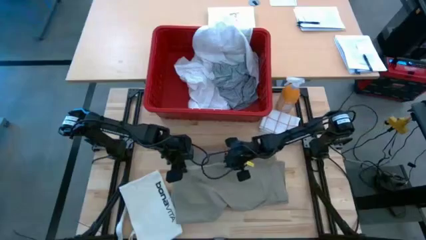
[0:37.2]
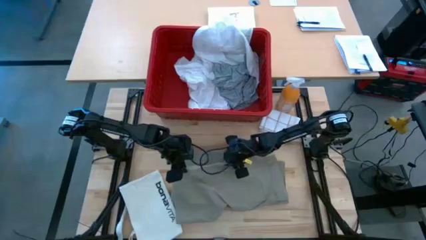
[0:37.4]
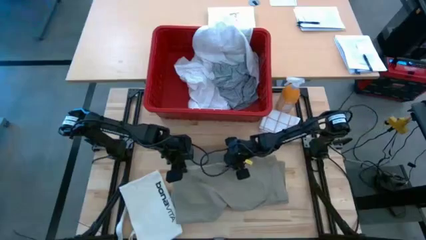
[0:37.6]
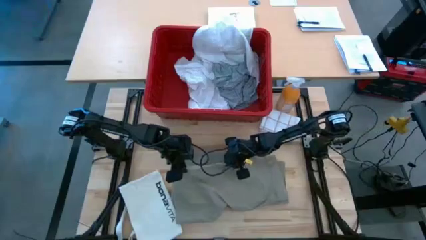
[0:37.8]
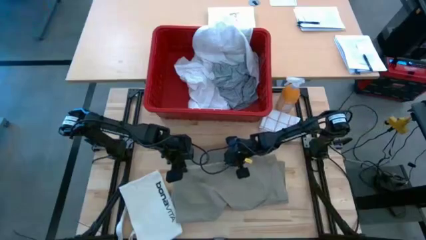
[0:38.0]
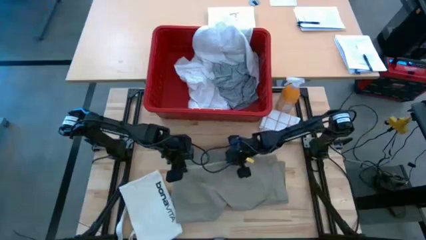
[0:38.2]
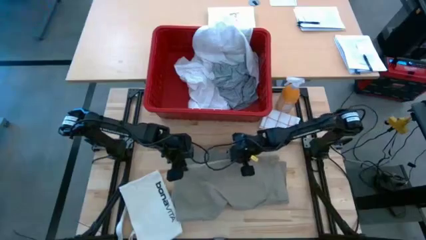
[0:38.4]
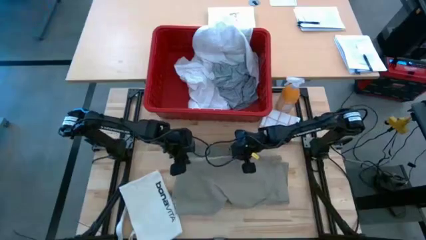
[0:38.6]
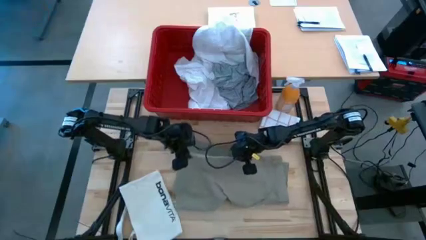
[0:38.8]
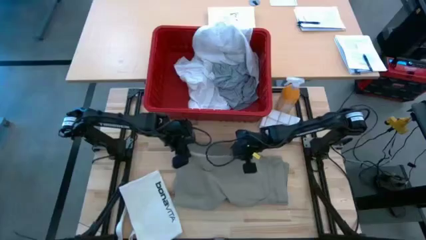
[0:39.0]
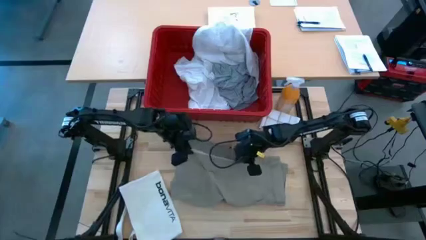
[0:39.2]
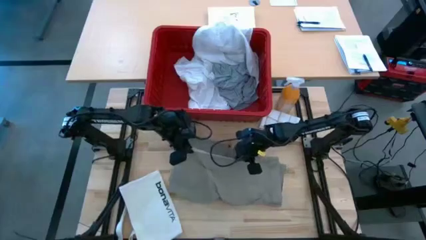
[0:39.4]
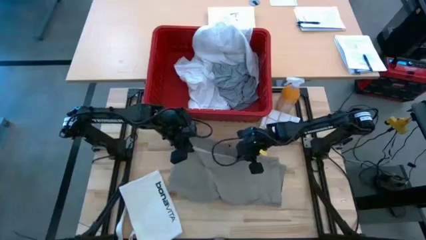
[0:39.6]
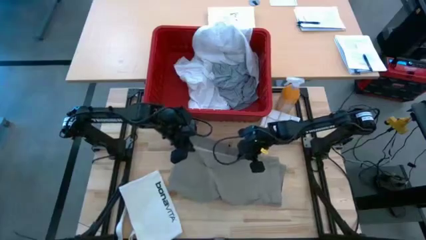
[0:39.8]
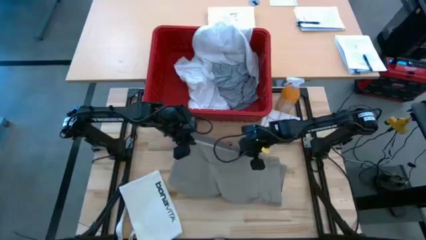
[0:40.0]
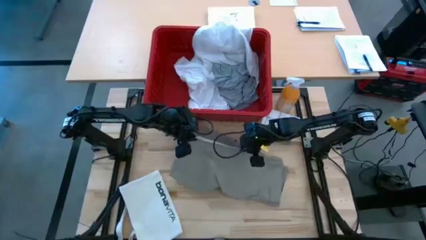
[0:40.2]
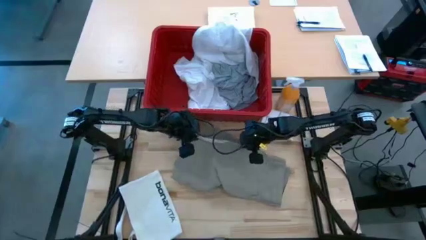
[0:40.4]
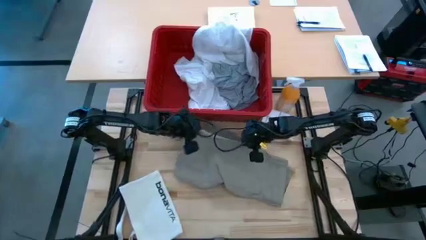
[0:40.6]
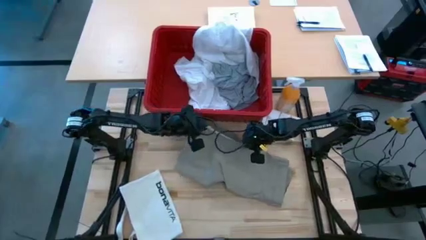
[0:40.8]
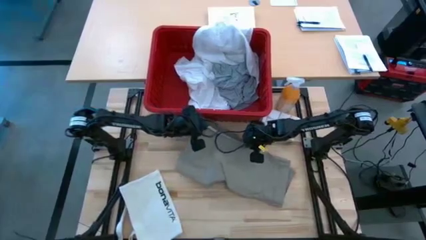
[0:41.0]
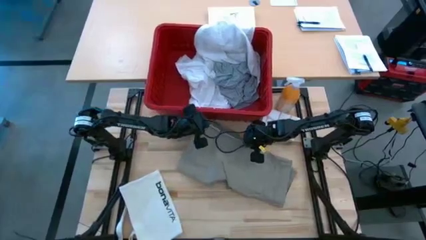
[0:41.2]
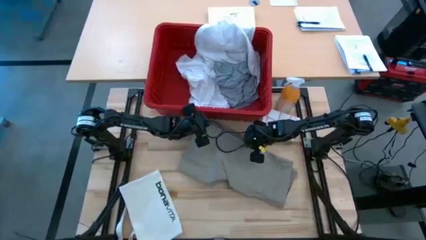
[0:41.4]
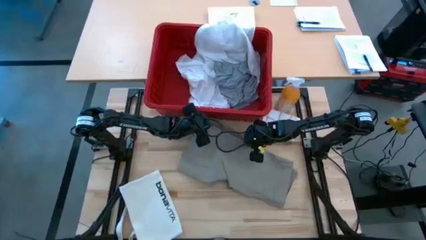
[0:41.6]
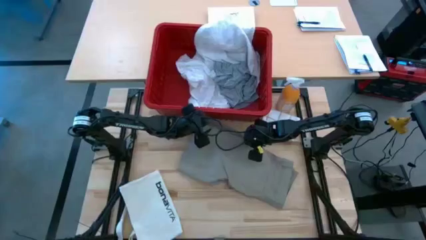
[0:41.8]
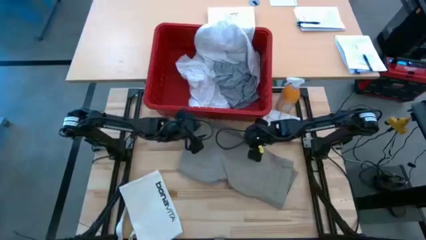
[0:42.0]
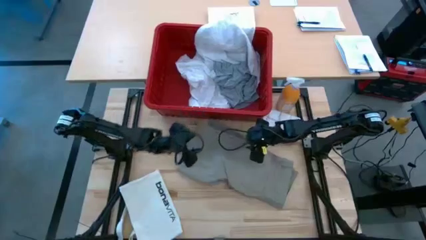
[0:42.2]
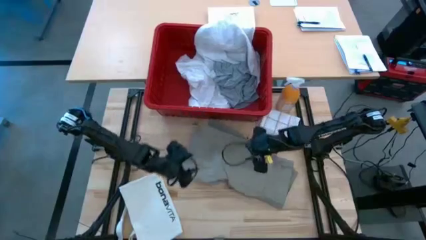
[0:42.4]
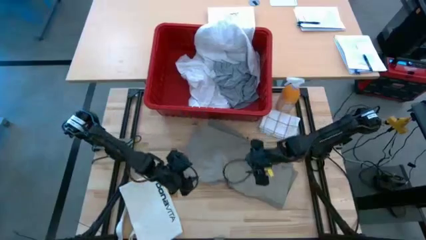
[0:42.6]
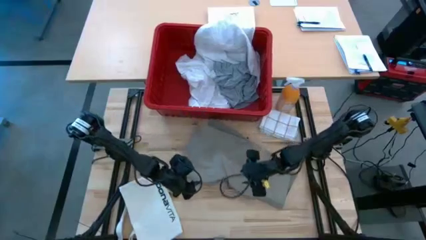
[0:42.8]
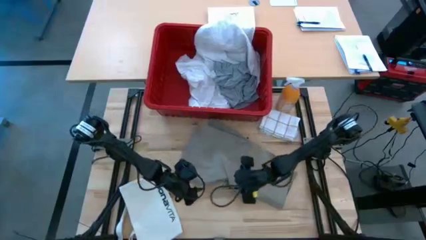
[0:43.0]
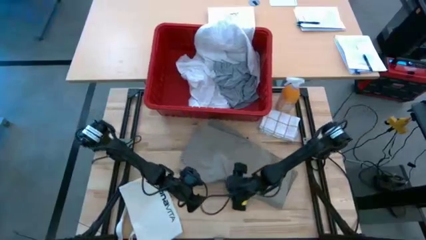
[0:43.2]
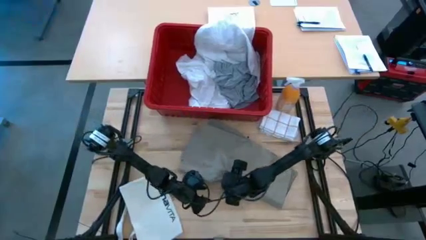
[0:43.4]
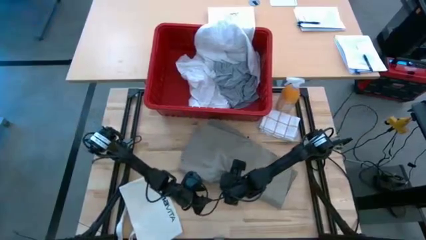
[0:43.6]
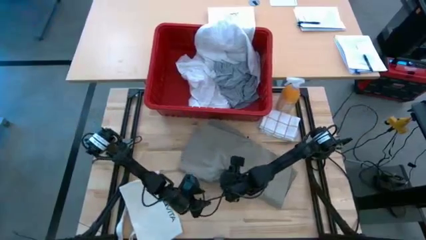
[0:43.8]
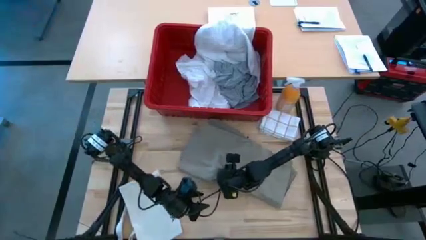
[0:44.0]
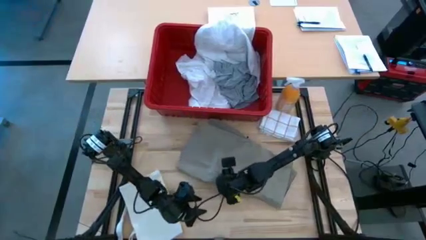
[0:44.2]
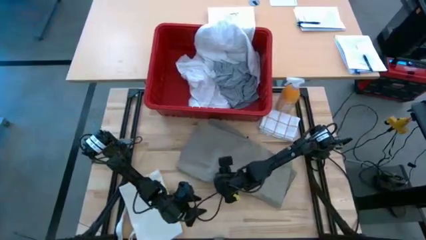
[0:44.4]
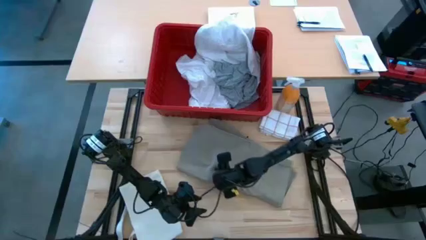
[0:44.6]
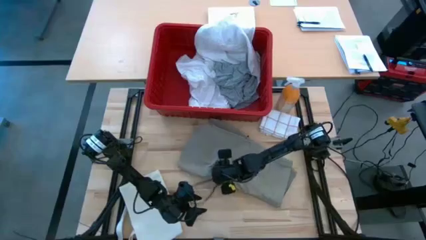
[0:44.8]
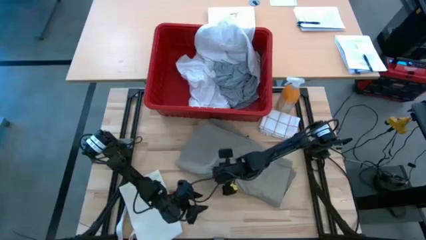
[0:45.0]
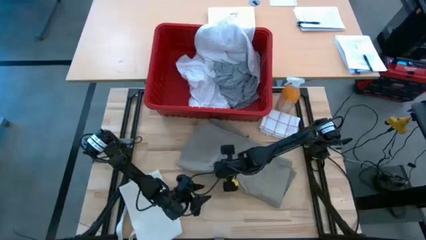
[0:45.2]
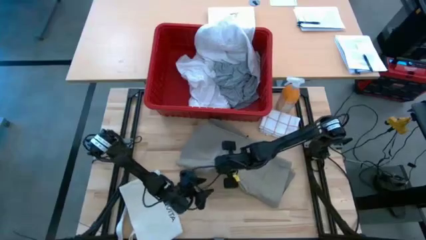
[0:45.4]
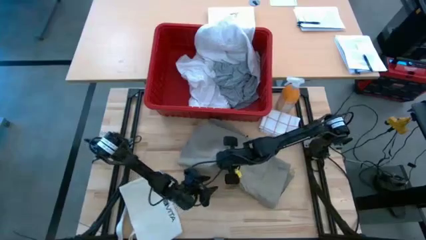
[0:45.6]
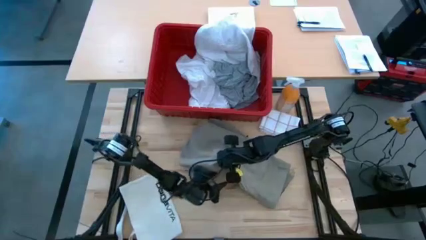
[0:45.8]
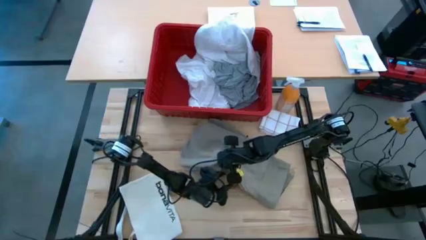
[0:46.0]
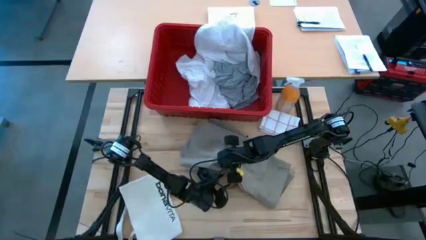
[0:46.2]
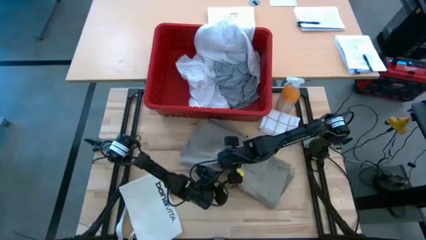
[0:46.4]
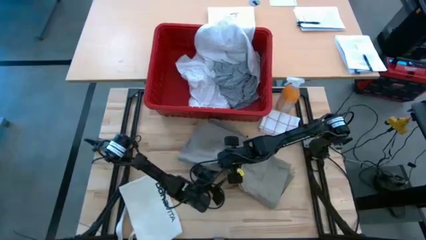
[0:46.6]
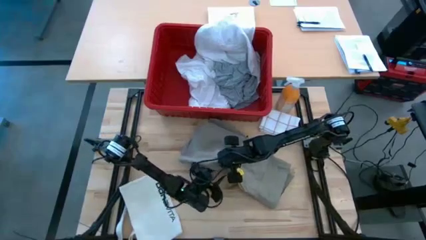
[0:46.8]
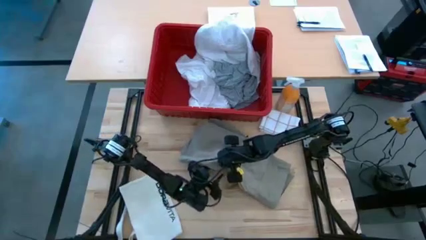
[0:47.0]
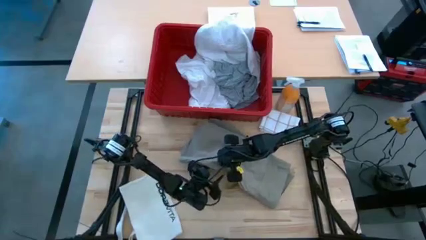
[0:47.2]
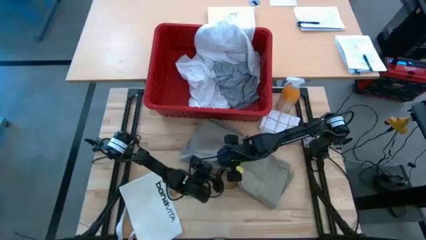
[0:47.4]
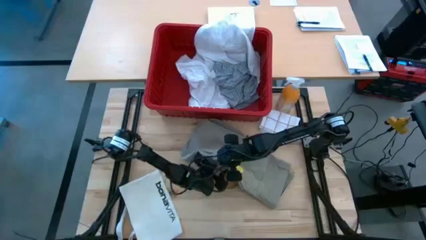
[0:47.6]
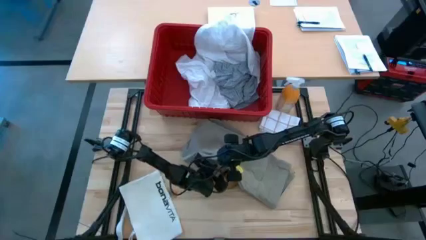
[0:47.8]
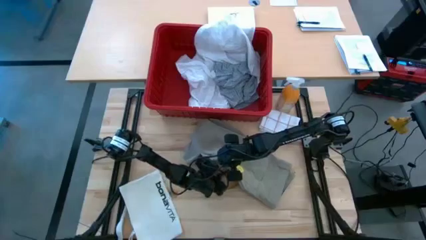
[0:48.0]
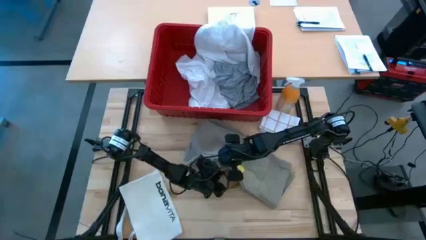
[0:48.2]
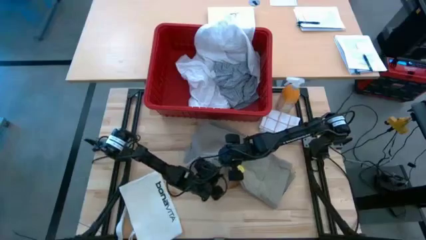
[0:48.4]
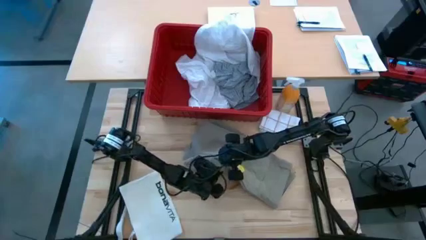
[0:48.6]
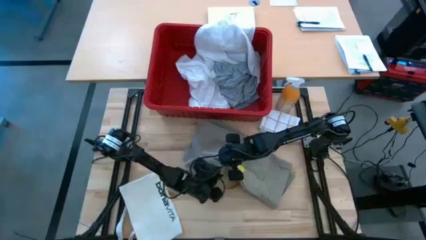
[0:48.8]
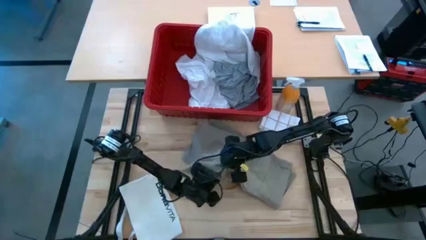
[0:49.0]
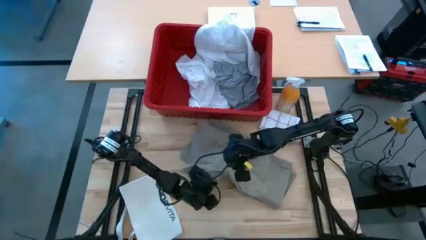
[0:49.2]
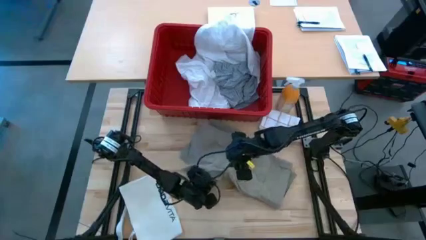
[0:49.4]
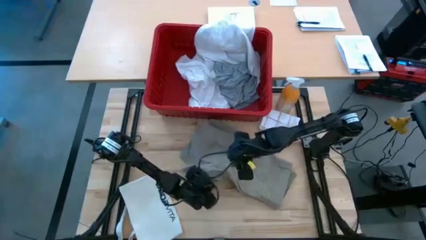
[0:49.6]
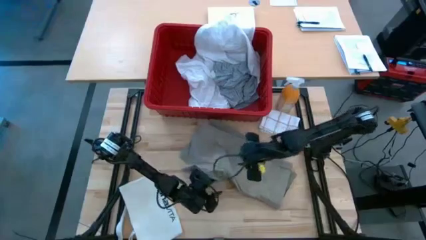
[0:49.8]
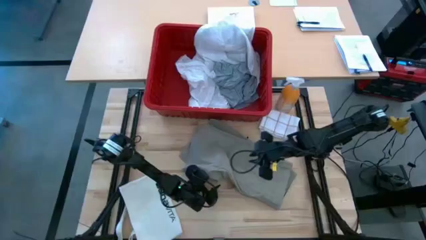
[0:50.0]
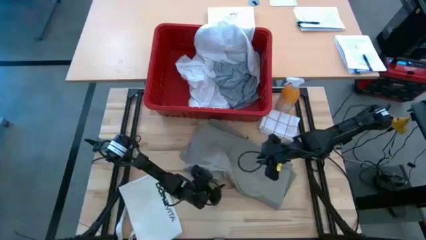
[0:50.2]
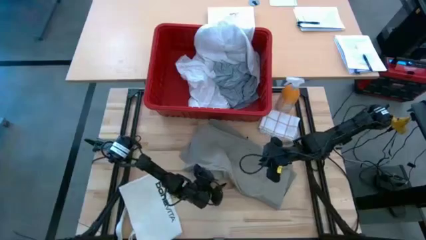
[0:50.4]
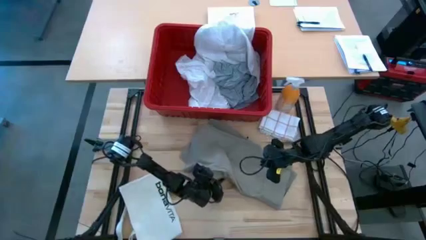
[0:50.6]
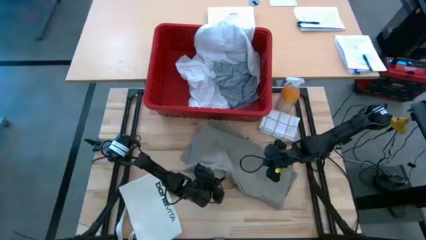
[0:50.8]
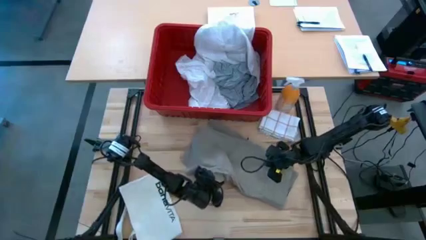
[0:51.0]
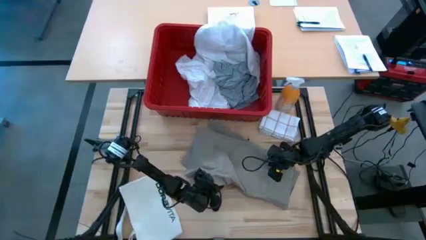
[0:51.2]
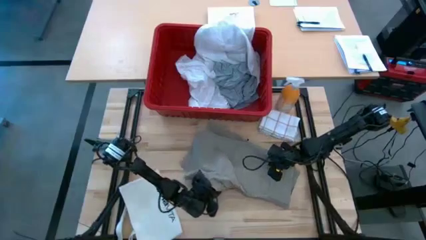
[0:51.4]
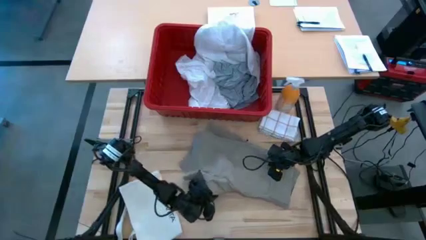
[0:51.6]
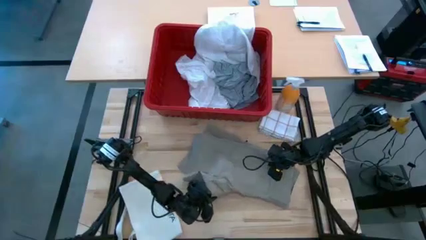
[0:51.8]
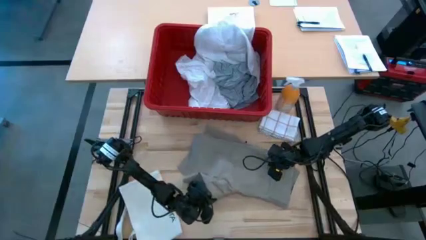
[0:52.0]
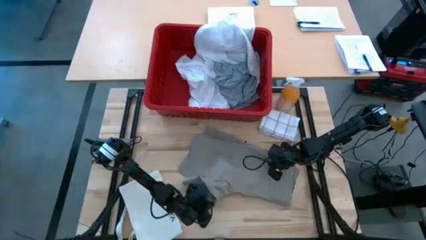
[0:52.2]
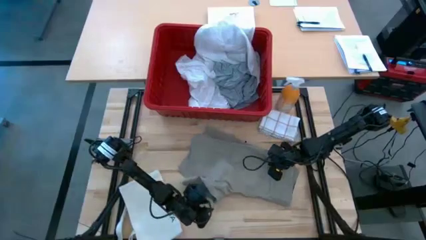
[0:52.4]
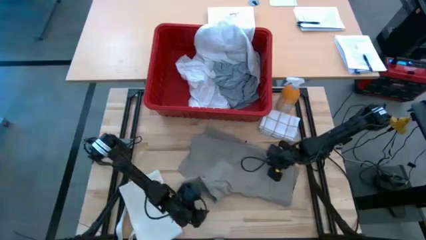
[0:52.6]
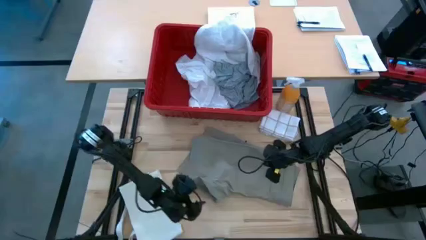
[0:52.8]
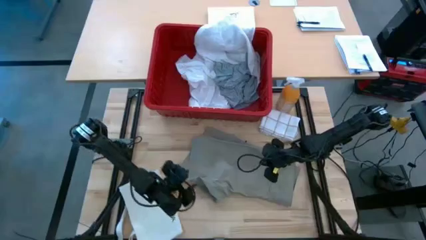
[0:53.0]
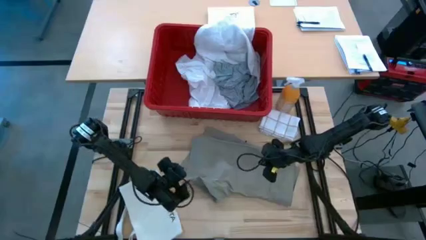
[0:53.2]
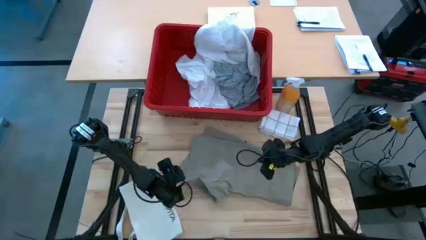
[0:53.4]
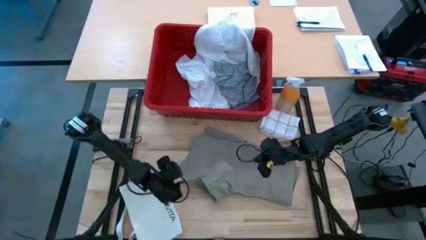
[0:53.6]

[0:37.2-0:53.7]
Task: Fold laundry
Fold the brown shorts
